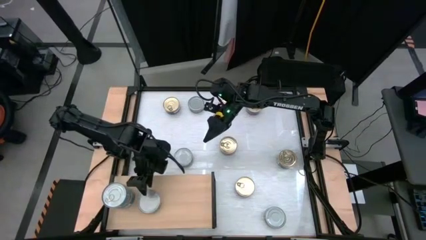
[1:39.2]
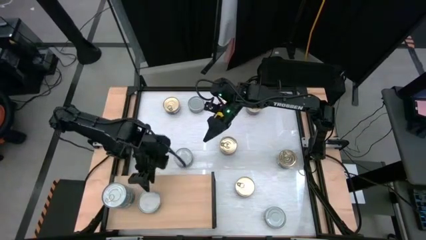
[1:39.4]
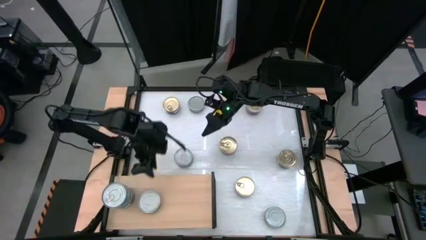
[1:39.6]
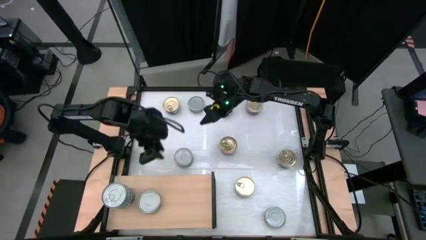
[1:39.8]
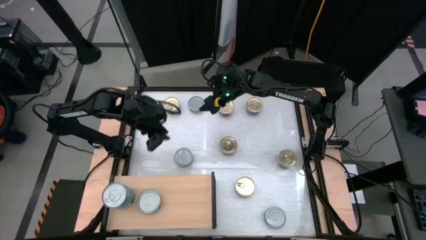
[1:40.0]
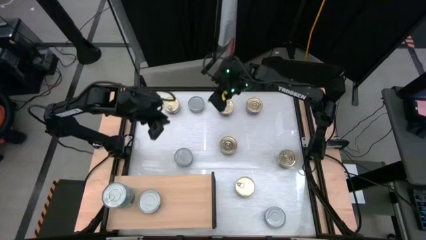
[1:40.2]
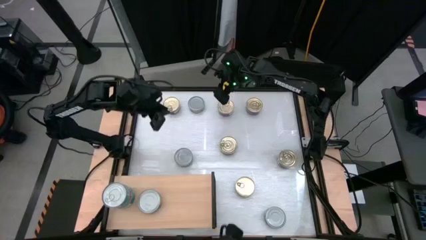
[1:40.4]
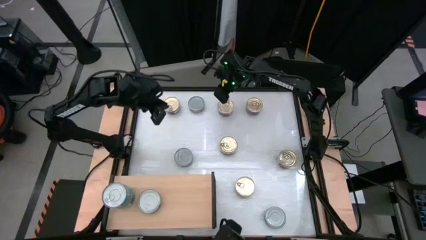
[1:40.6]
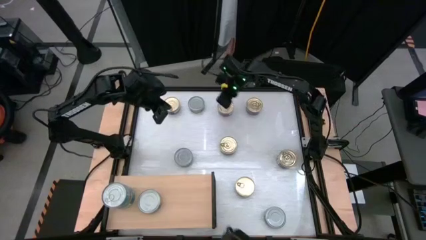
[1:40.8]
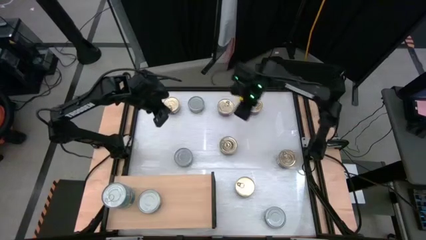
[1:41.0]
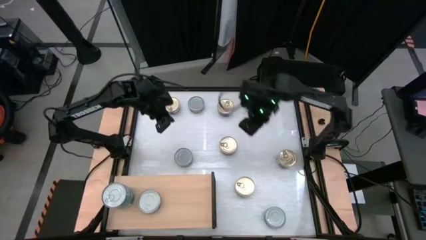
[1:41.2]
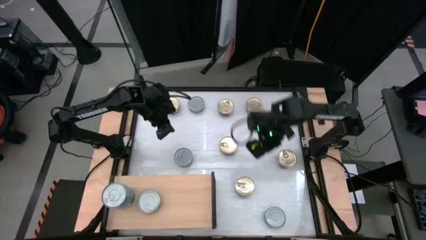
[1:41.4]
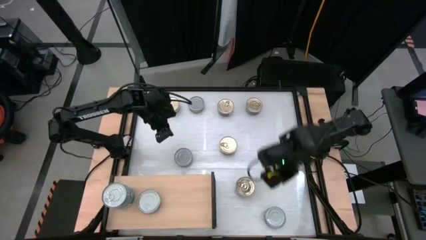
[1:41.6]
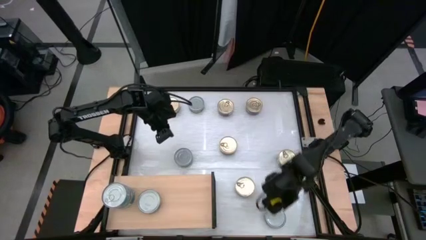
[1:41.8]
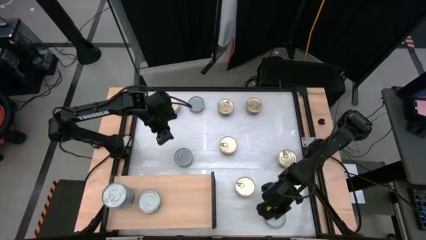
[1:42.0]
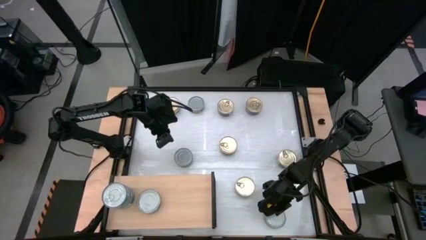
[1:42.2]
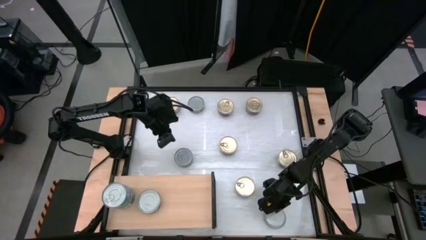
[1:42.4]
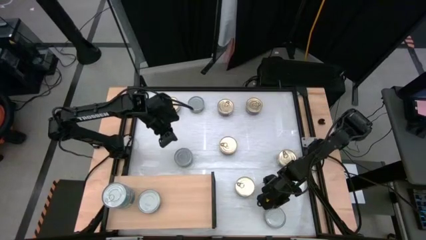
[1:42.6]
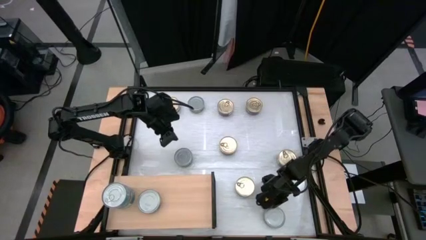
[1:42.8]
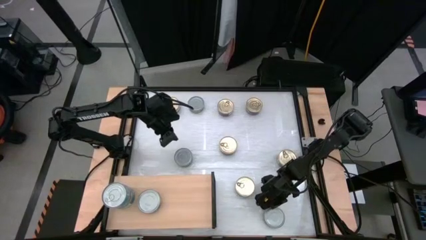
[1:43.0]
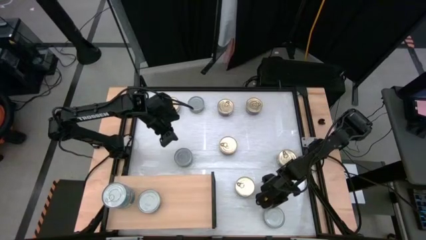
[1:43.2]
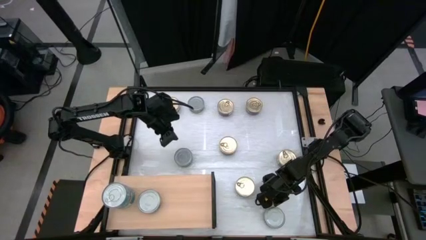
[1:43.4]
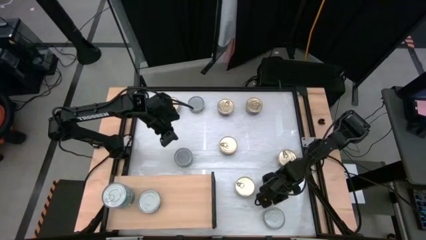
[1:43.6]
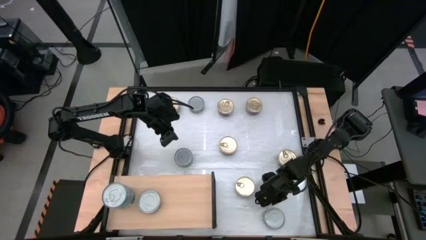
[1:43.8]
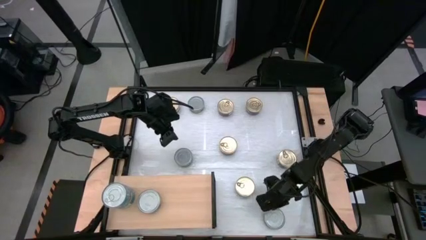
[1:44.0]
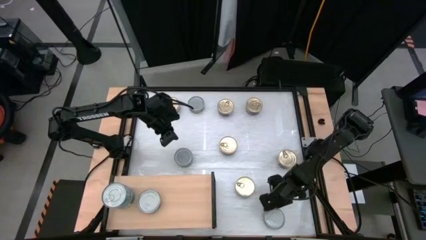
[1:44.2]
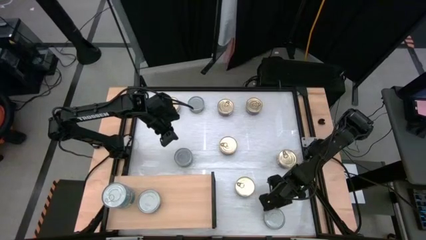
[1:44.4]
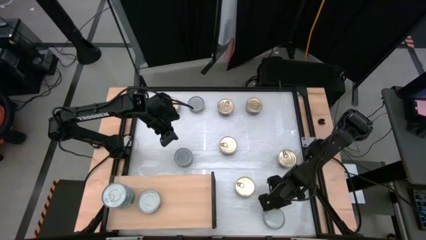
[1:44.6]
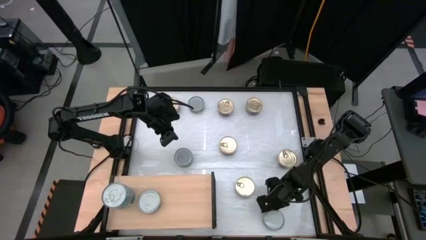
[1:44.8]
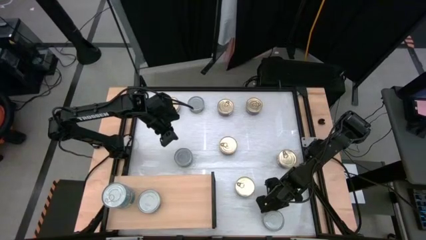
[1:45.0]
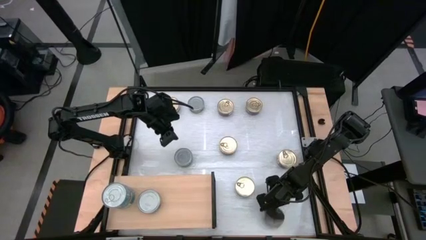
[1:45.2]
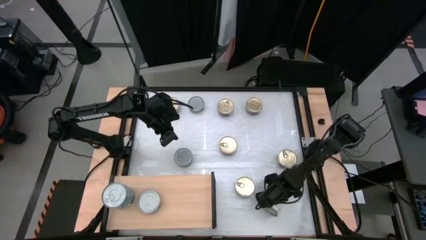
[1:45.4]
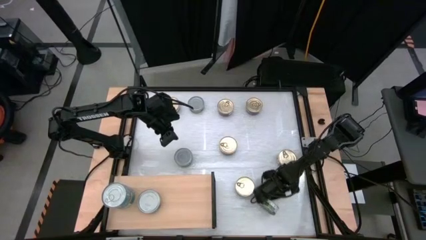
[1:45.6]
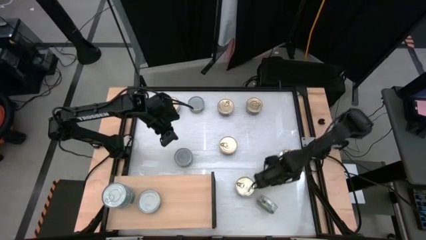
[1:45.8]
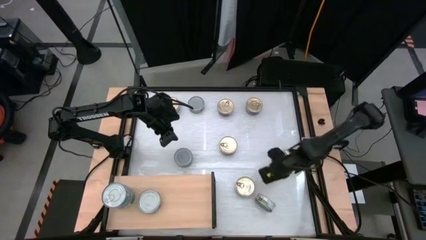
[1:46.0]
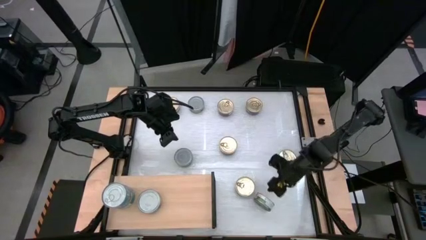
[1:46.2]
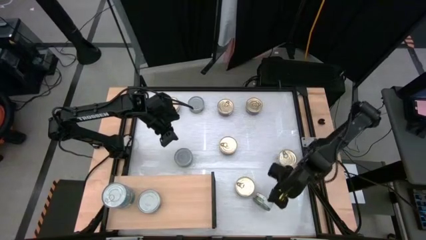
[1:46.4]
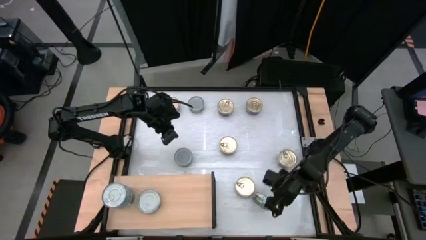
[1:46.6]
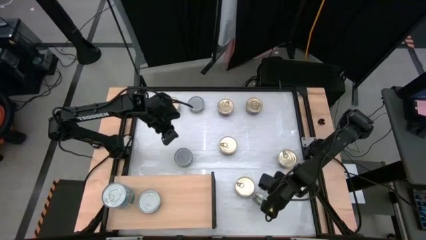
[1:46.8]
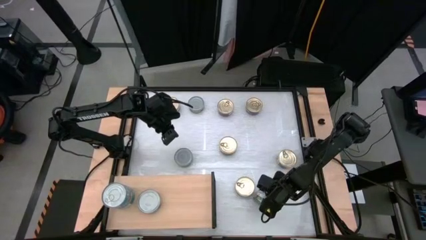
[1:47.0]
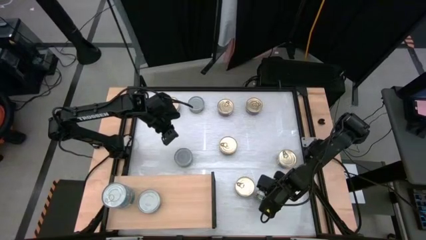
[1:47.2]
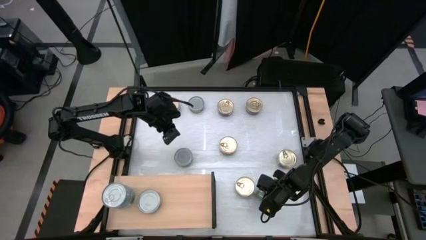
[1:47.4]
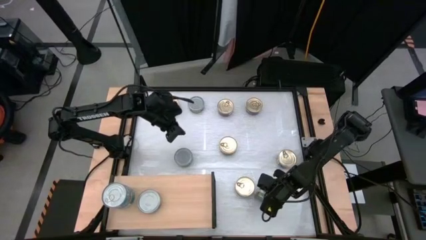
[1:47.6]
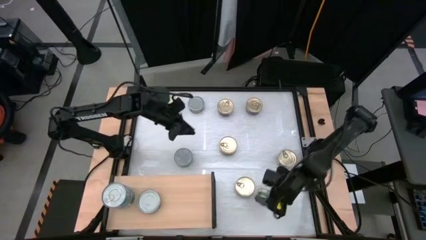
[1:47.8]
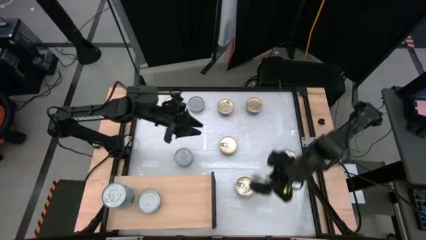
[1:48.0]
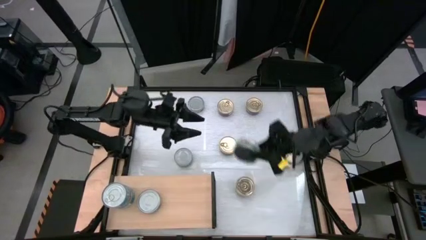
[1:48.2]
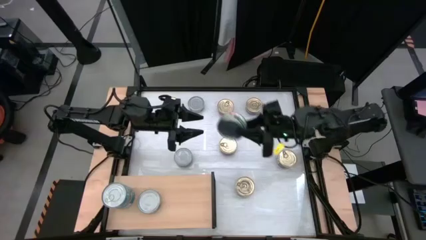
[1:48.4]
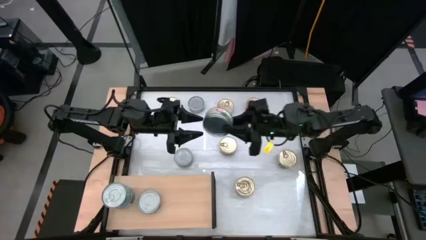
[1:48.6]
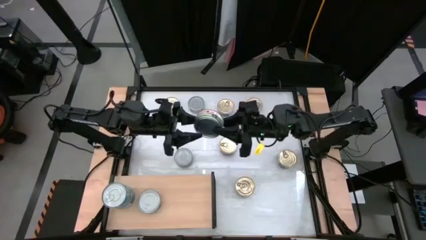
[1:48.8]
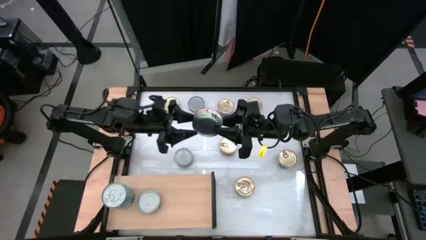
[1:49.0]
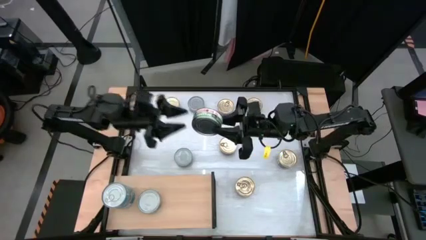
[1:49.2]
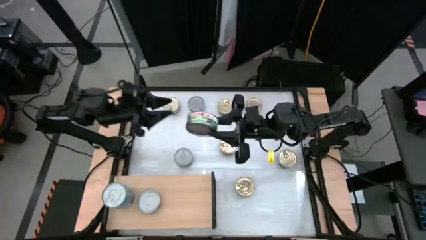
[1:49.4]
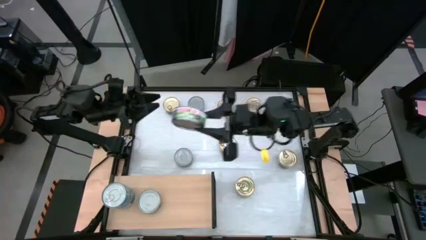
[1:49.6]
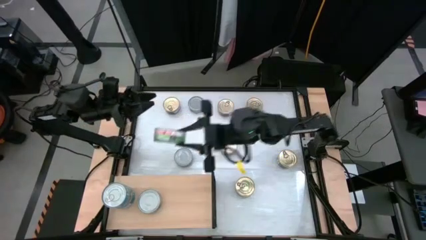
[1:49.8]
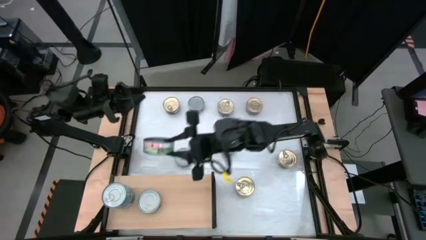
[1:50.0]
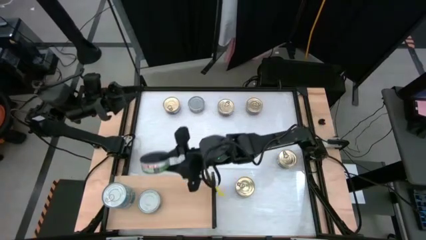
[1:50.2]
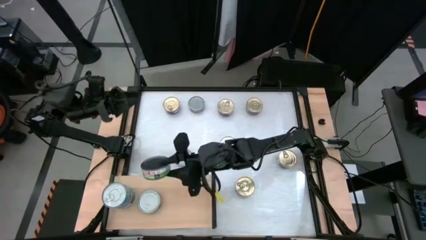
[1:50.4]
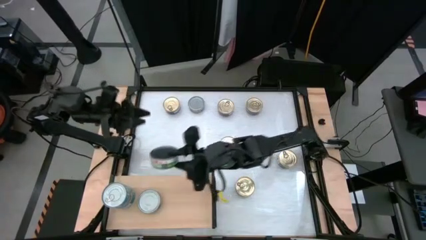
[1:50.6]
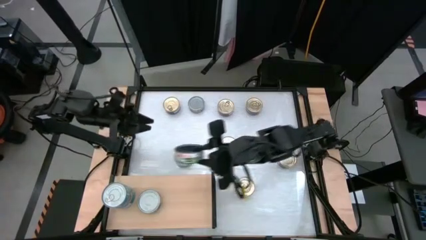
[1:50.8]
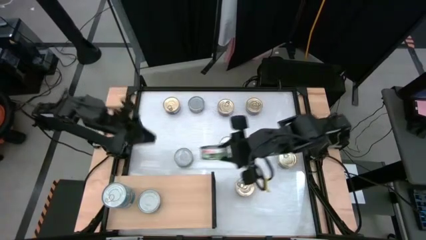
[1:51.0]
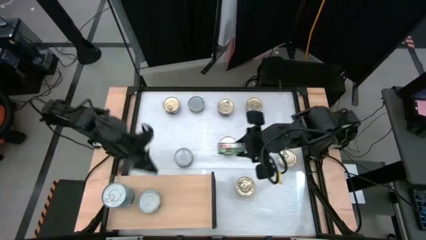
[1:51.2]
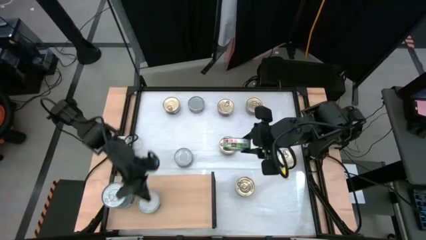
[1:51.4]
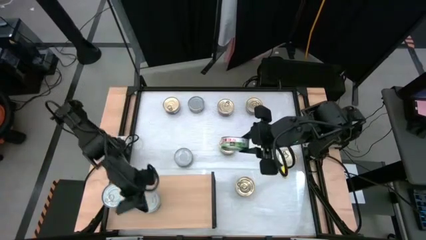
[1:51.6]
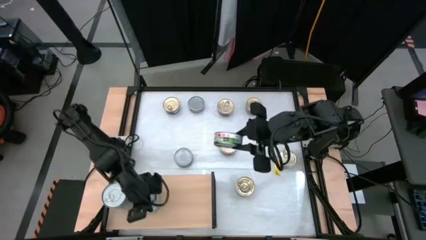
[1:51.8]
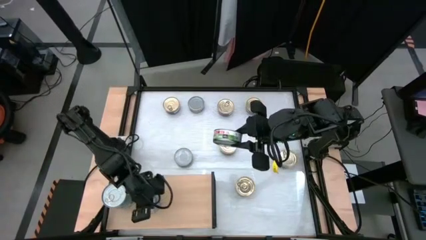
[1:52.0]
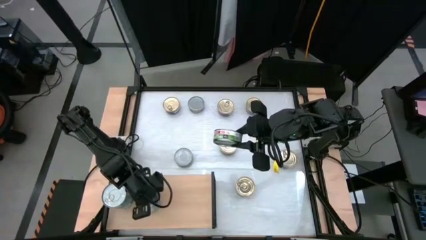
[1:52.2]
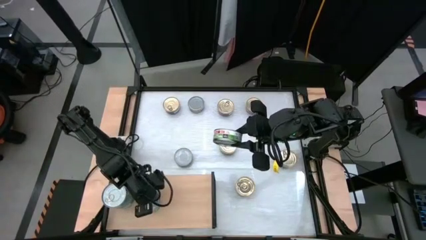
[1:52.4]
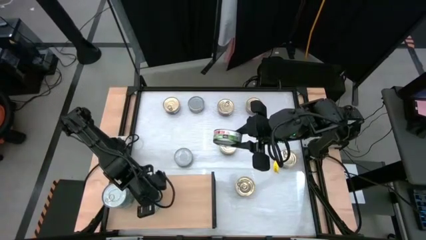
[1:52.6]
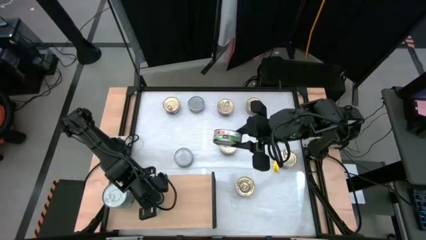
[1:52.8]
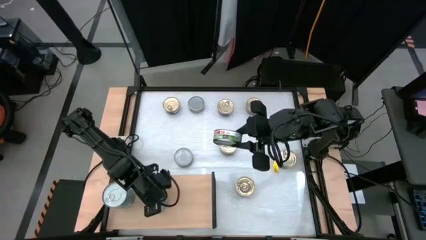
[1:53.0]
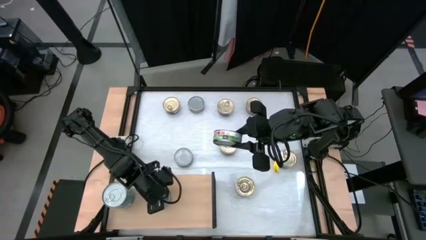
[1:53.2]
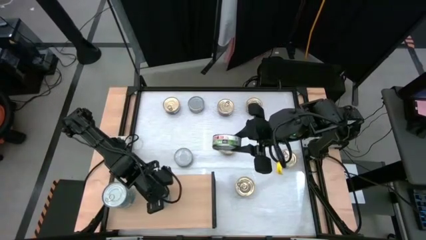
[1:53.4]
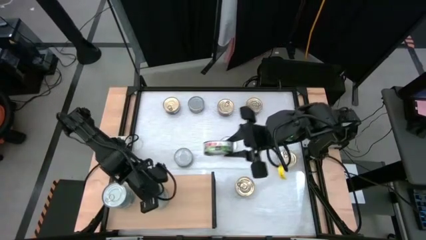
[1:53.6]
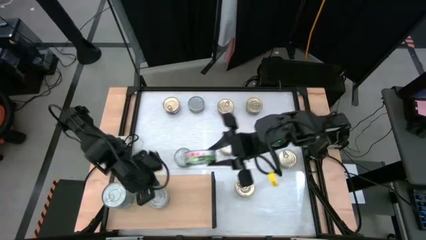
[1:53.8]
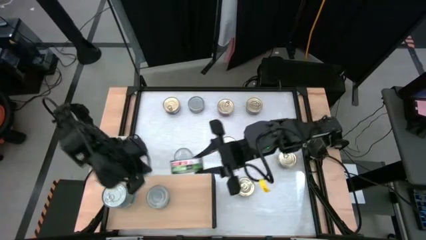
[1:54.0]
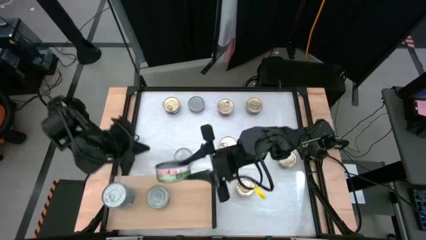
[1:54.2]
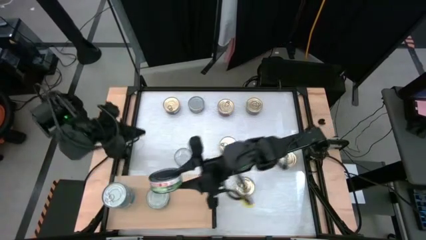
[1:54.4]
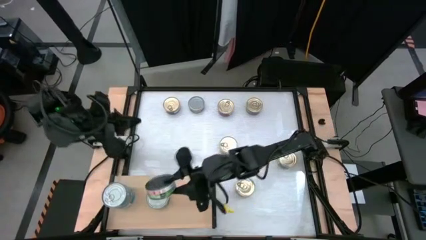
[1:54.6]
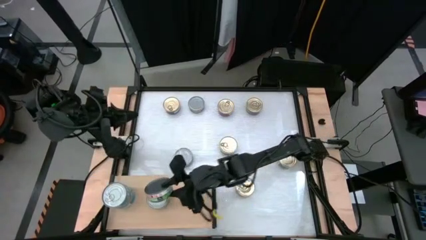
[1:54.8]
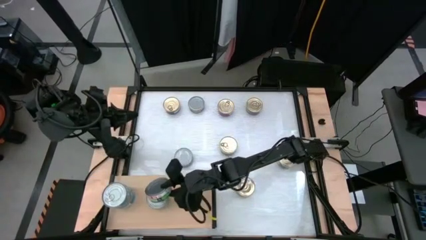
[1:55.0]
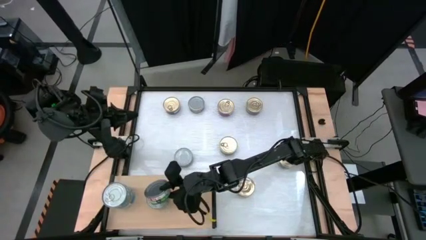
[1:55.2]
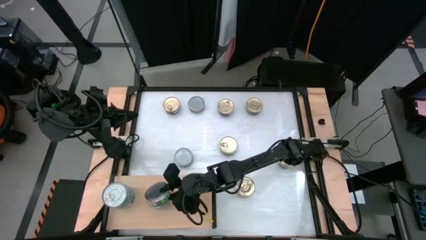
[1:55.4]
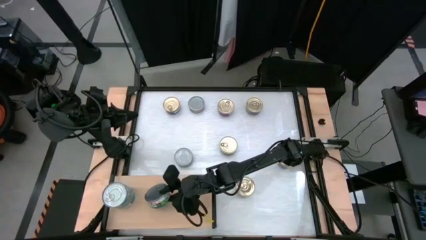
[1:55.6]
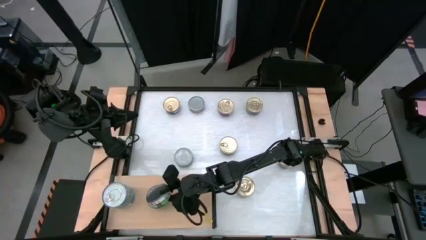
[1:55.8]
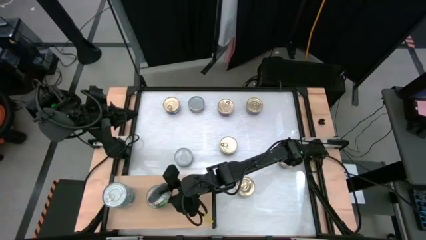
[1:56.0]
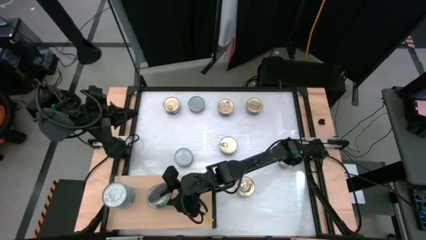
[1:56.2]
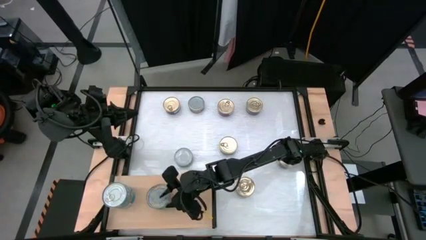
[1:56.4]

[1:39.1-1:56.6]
Task: Stack canned seafood by type on shelf
Stack the green tuna can on top of the green tuna can on the shelf
